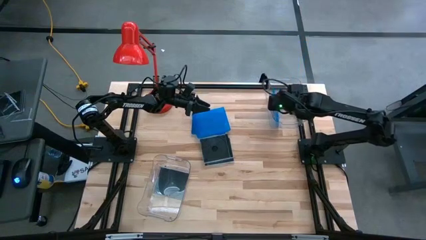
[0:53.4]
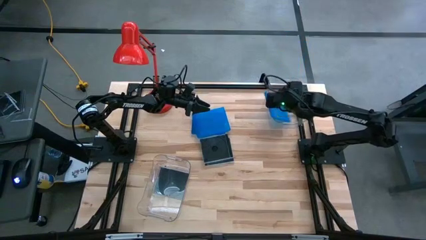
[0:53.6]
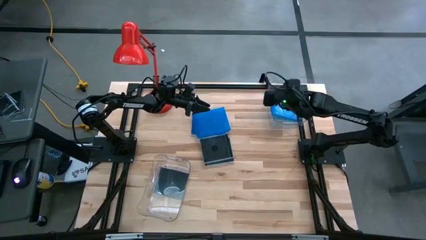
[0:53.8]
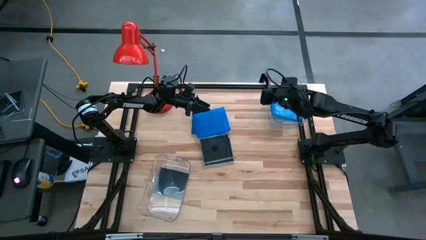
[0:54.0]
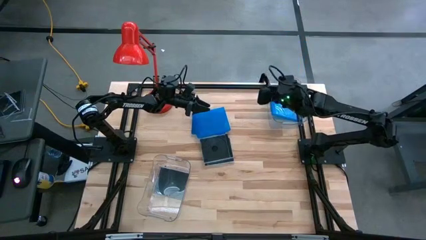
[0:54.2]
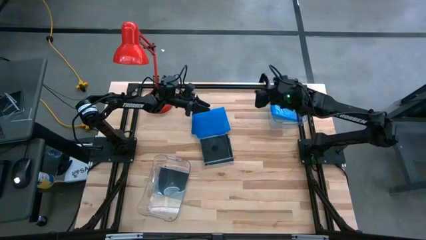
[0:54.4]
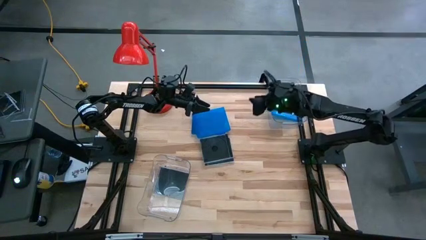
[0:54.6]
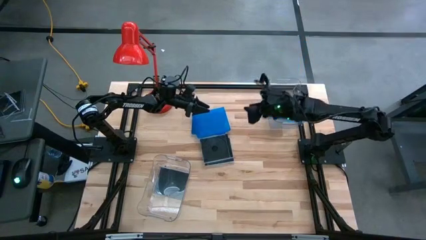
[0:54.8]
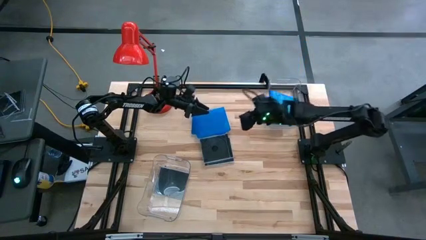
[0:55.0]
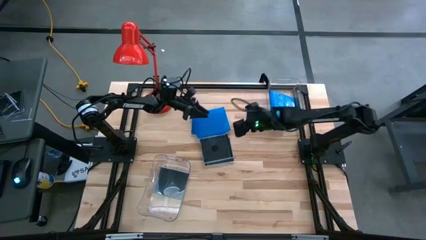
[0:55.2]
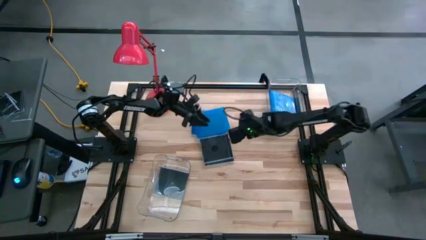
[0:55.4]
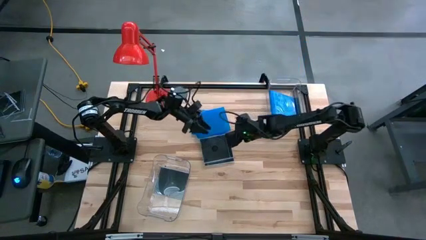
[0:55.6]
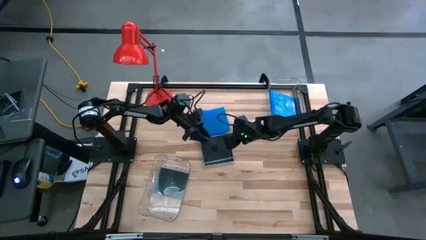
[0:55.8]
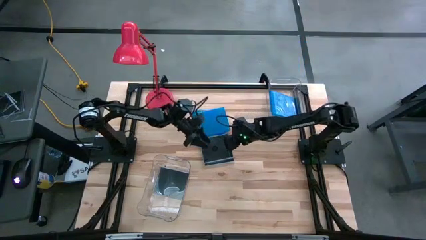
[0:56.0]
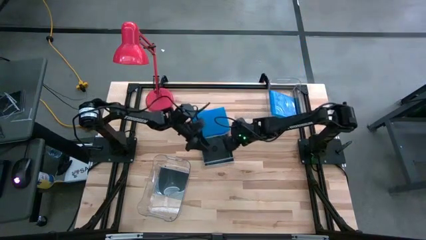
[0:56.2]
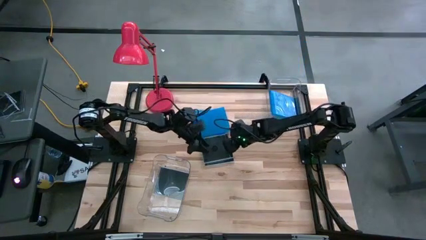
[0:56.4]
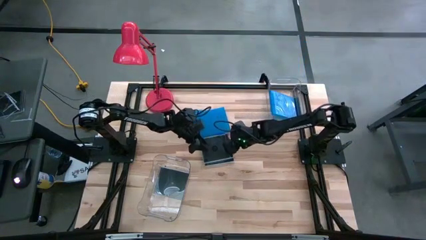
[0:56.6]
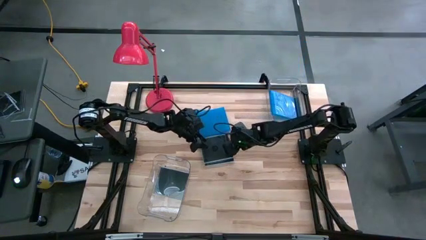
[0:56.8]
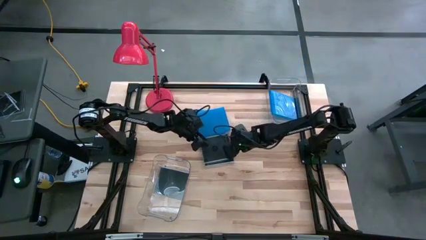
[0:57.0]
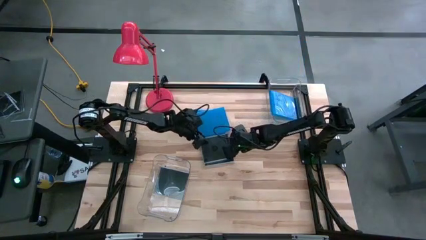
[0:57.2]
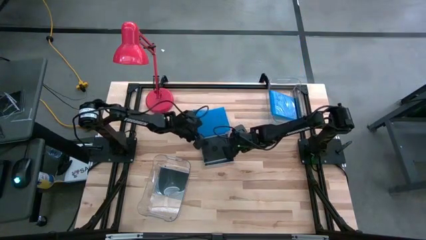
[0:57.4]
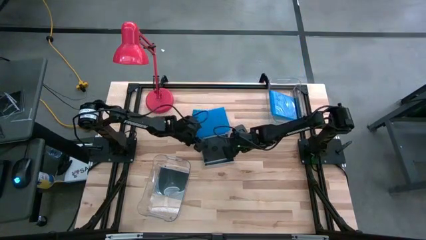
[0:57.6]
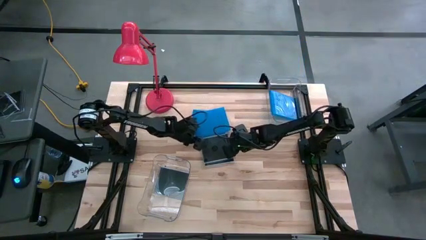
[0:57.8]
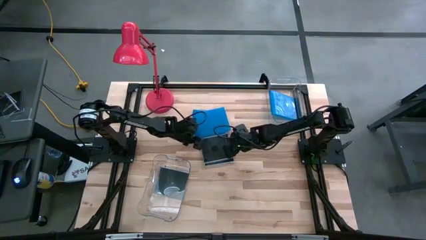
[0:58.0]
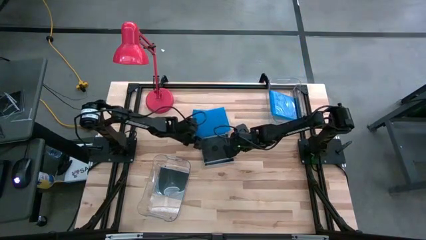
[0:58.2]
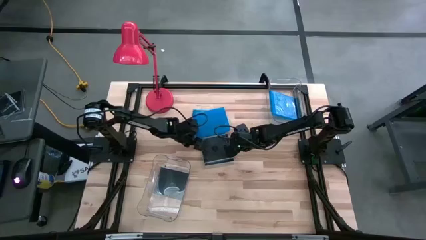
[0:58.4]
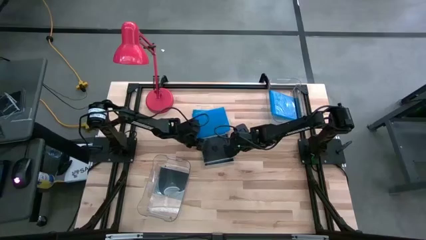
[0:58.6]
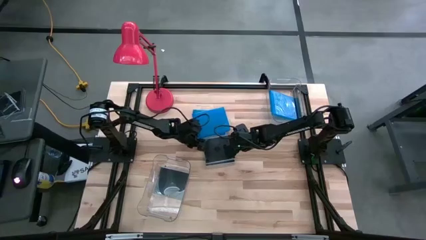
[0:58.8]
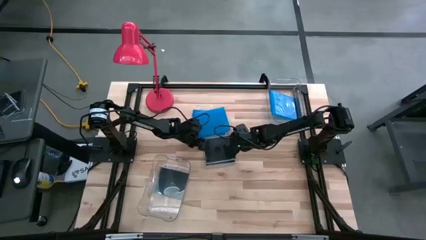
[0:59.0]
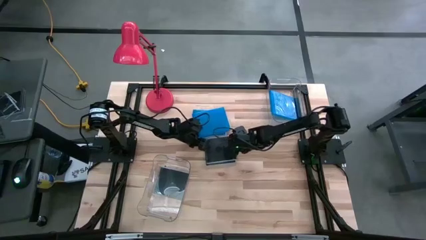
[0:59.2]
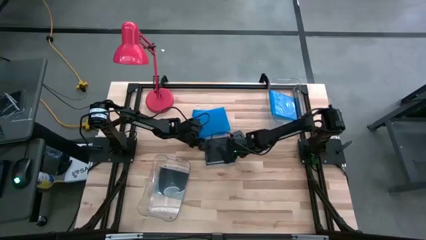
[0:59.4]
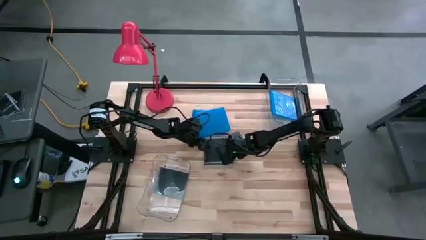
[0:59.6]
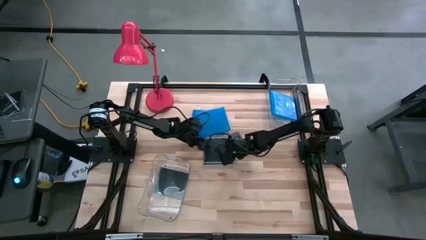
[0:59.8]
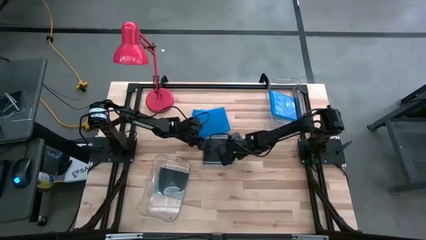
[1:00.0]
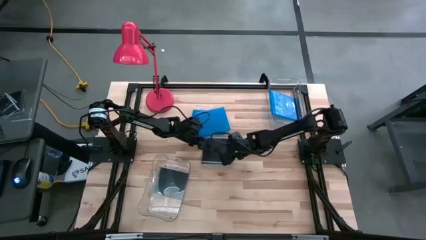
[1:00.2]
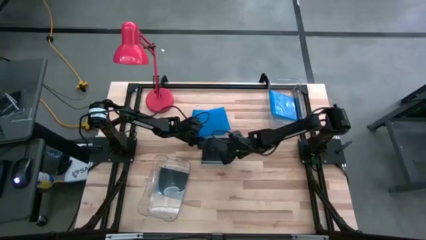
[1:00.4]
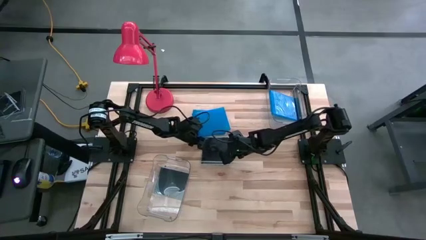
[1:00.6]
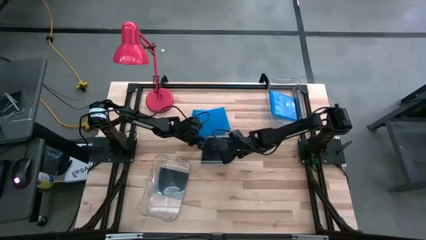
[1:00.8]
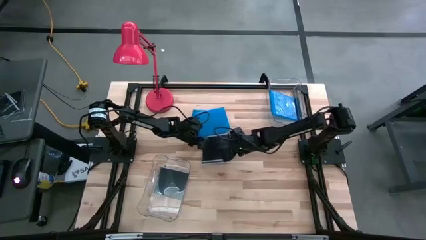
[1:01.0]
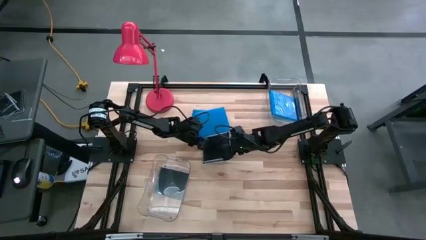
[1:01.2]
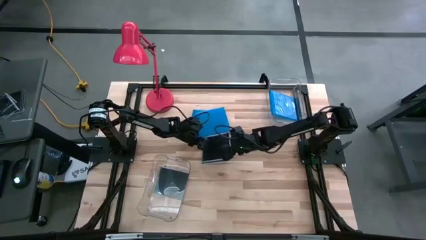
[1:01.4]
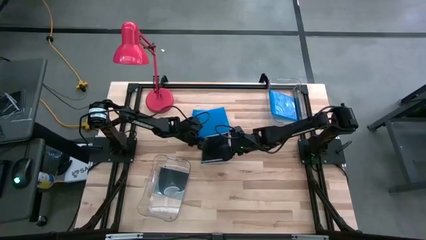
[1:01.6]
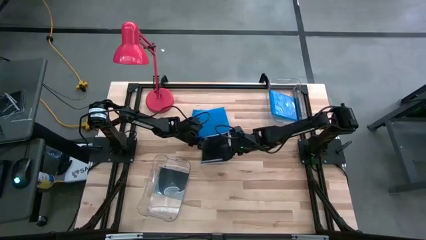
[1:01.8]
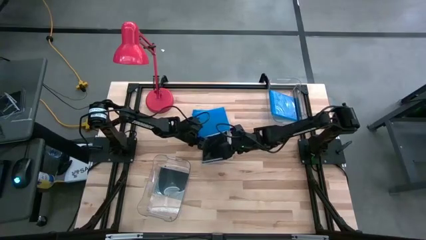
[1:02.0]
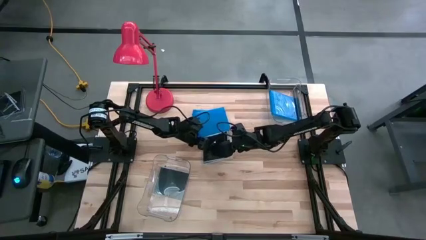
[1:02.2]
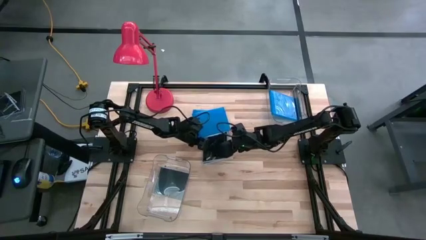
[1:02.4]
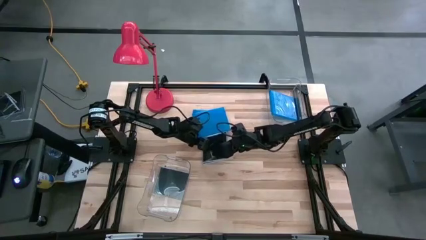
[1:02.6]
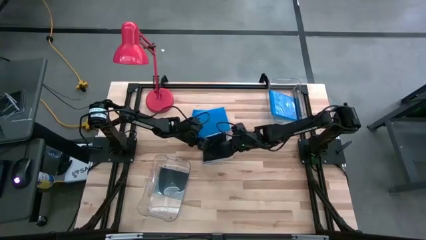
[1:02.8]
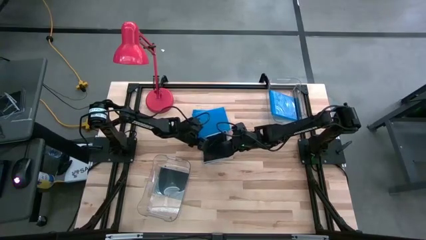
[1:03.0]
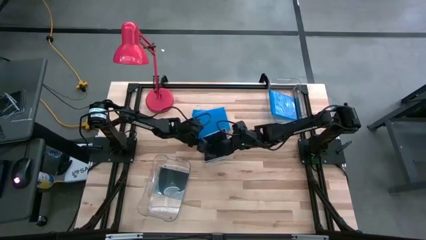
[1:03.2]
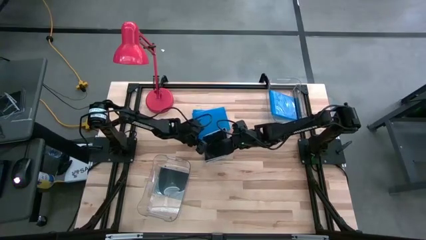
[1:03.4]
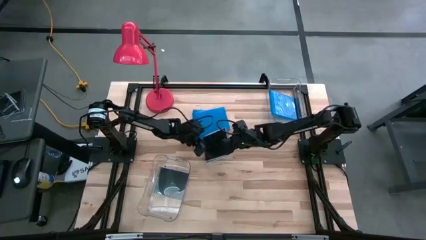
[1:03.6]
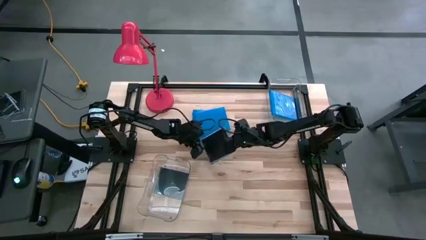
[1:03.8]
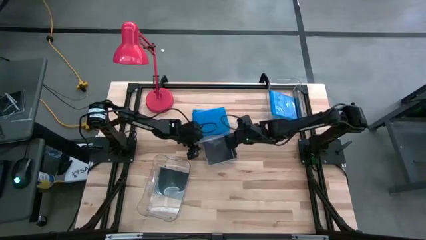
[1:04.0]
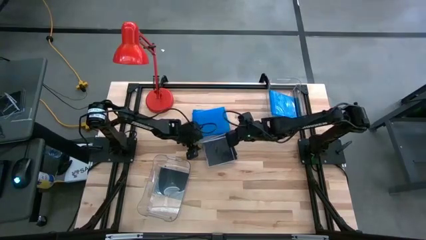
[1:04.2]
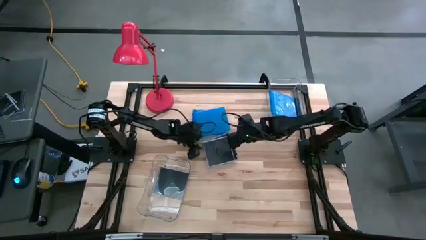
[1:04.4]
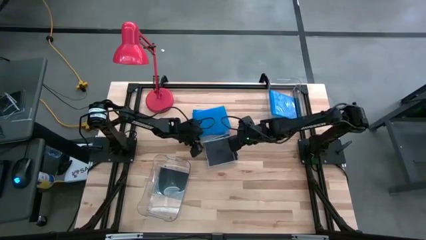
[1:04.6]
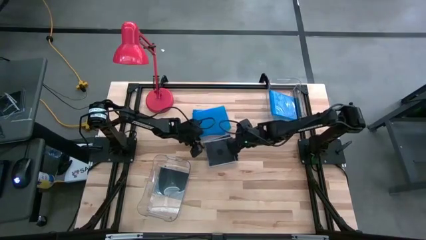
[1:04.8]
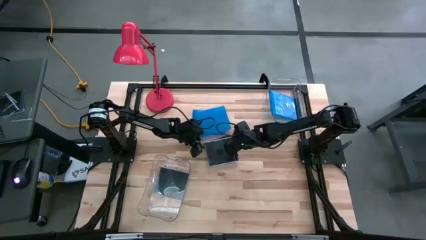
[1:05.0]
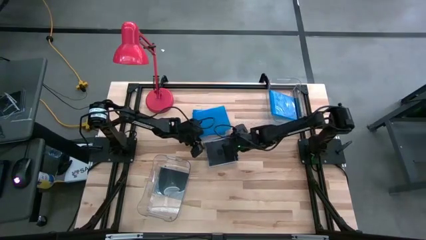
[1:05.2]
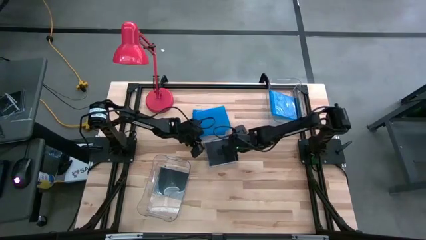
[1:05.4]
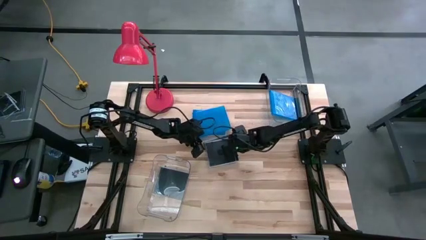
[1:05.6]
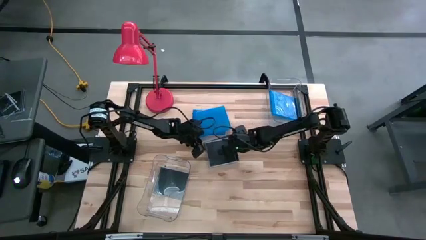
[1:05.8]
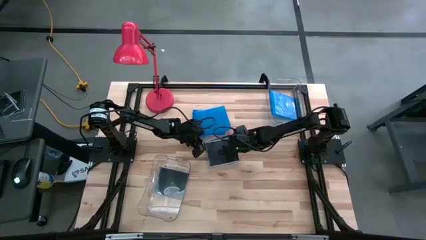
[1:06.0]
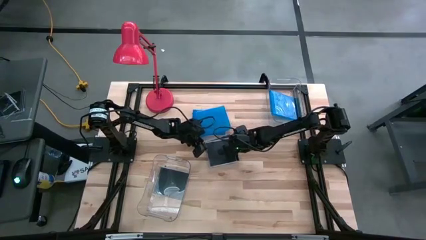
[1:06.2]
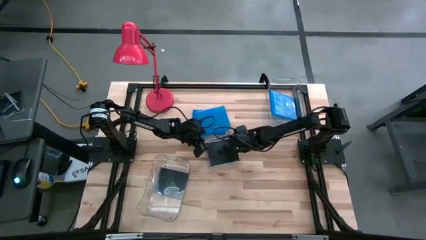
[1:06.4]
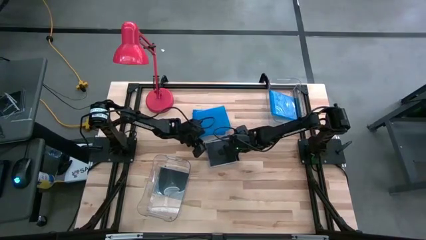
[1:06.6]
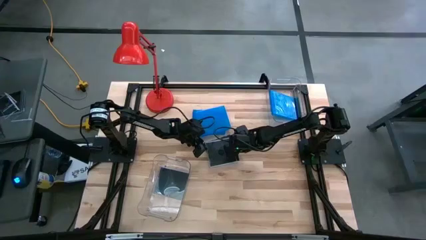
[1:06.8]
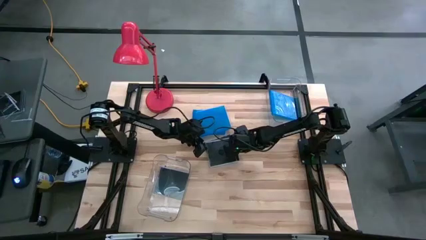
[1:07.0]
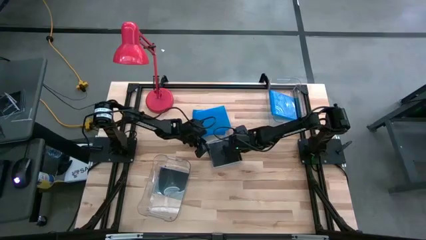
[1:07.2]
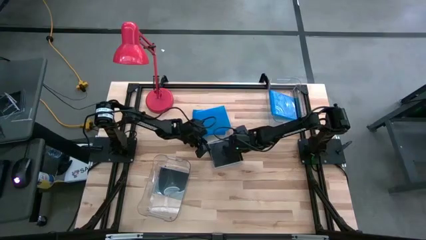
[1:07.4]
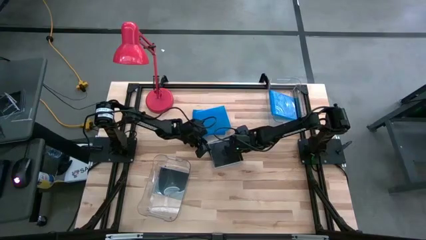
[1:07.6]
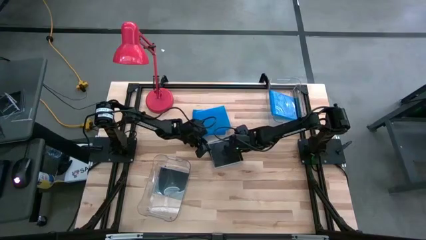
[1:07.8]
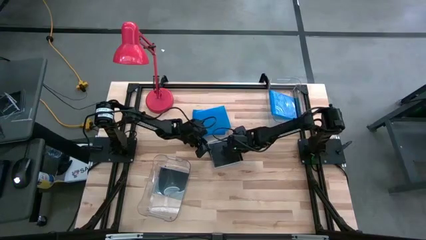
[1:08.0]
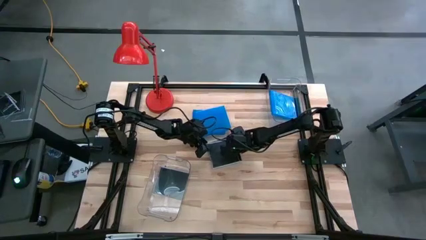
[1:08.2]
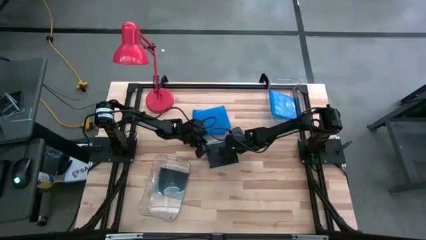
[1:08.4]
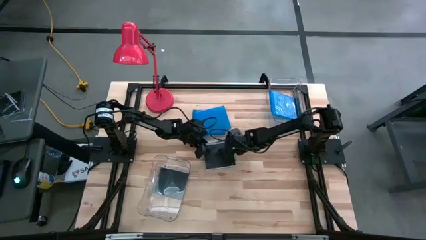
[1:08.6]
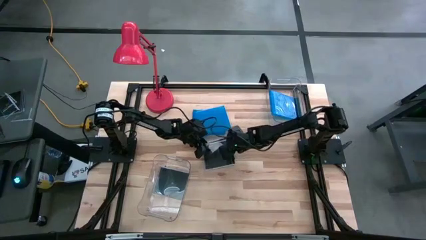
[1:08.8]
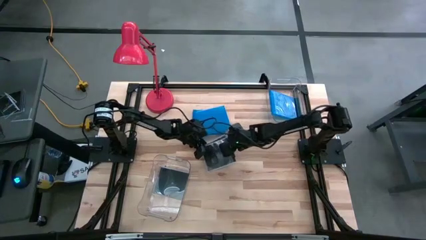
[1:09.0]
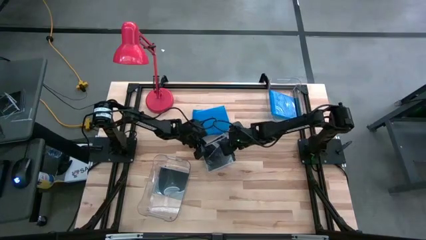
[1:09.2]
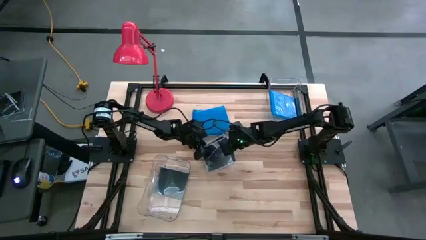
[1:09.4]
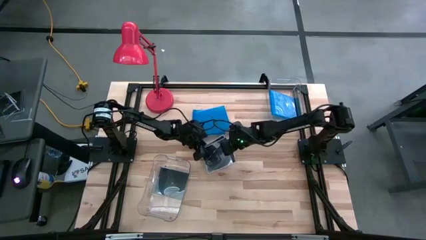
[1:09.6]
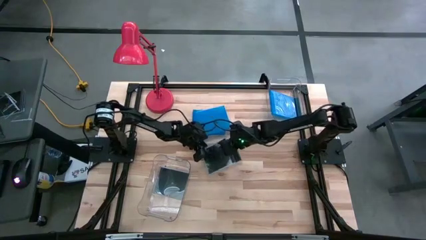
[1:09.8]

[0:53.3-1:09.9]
Task: Pick & place jewel cases by type
Put the black cd case into the bottom transparent bin
